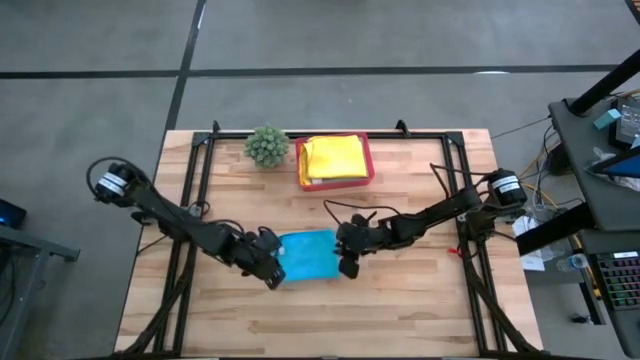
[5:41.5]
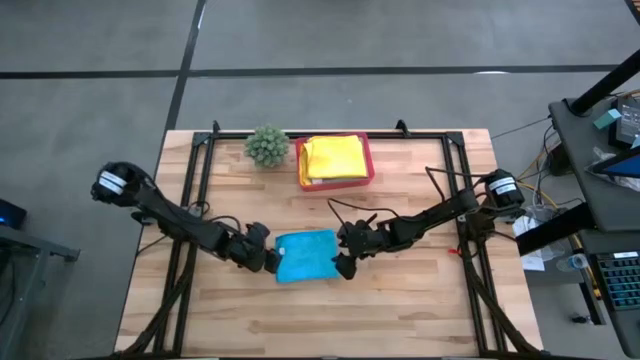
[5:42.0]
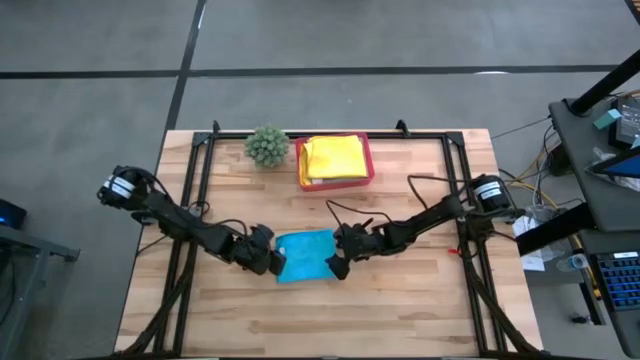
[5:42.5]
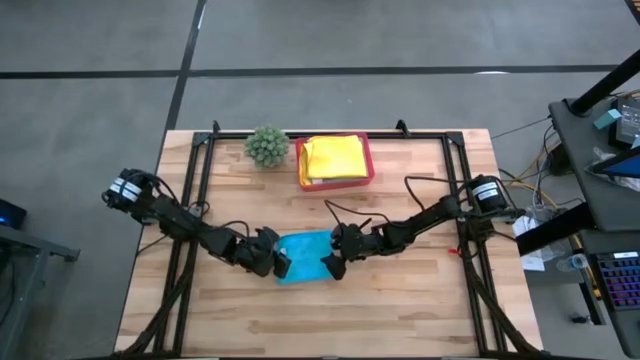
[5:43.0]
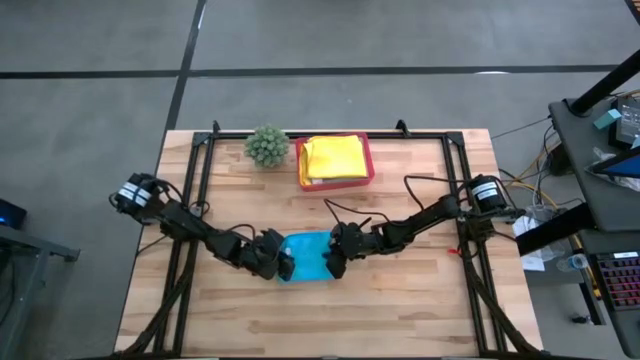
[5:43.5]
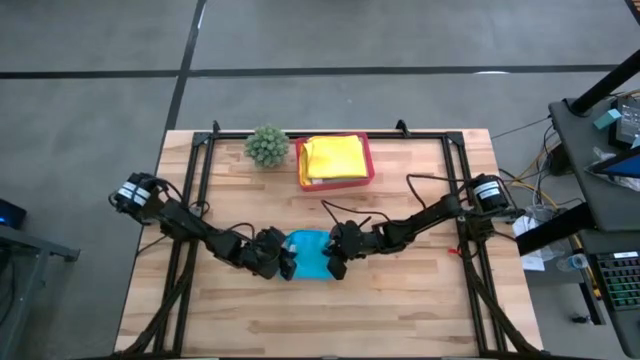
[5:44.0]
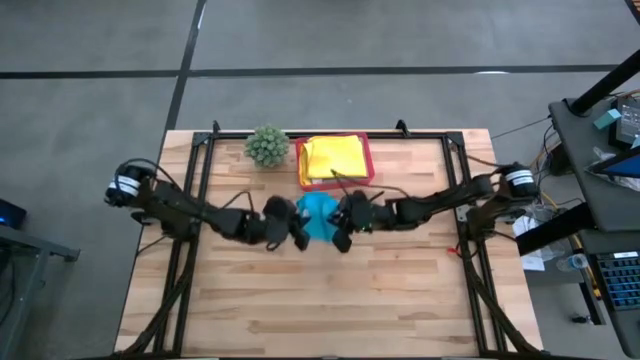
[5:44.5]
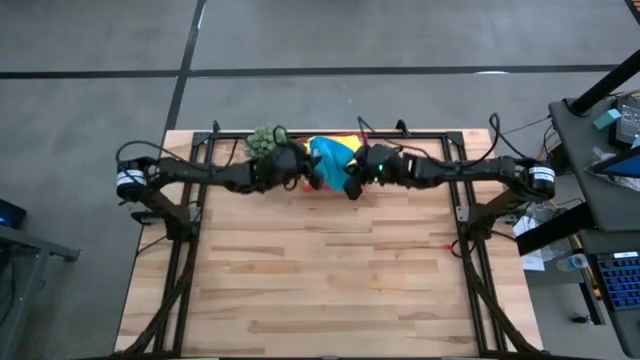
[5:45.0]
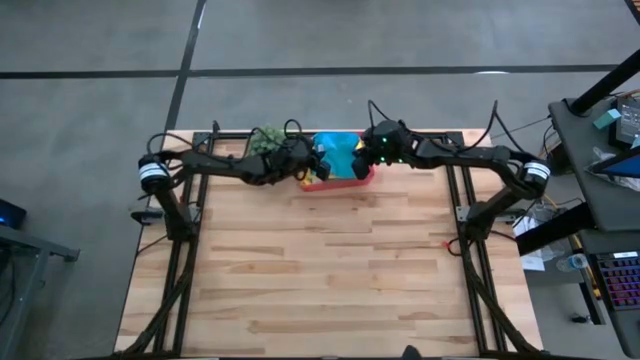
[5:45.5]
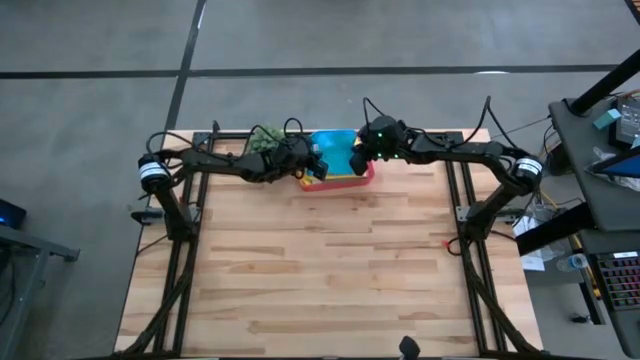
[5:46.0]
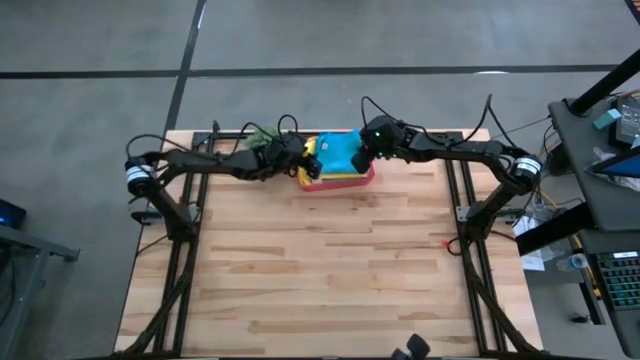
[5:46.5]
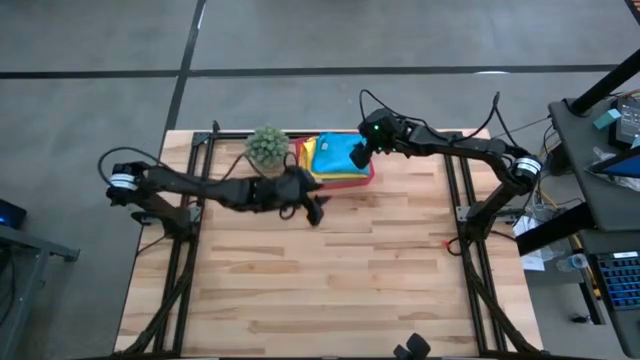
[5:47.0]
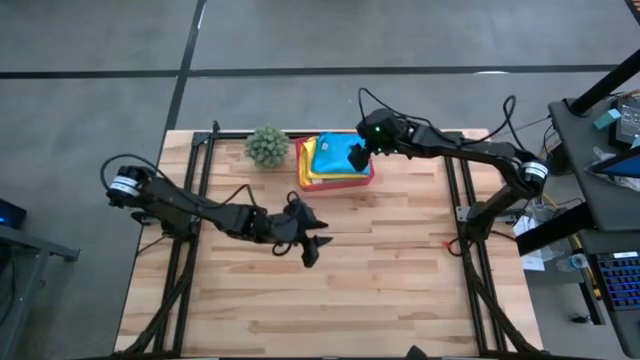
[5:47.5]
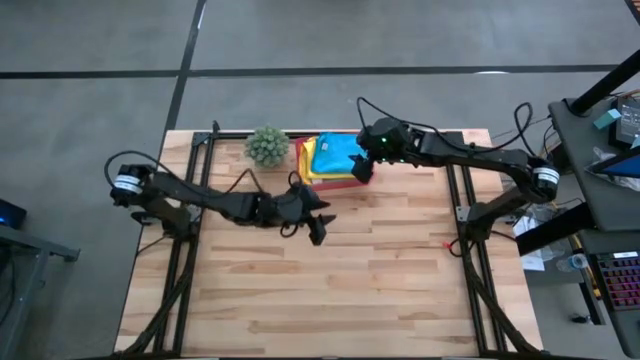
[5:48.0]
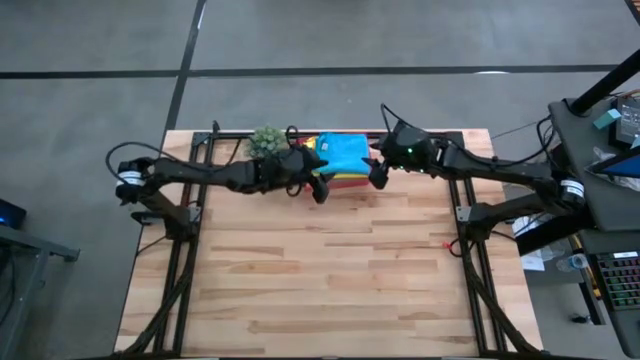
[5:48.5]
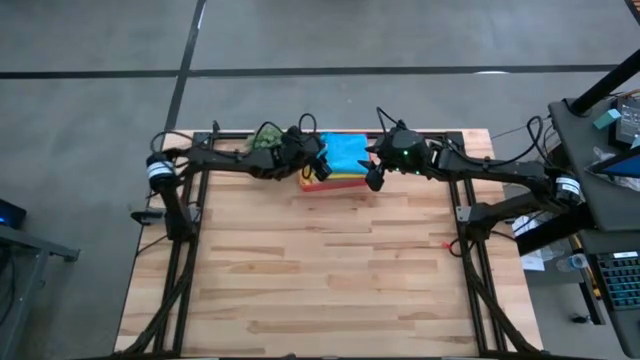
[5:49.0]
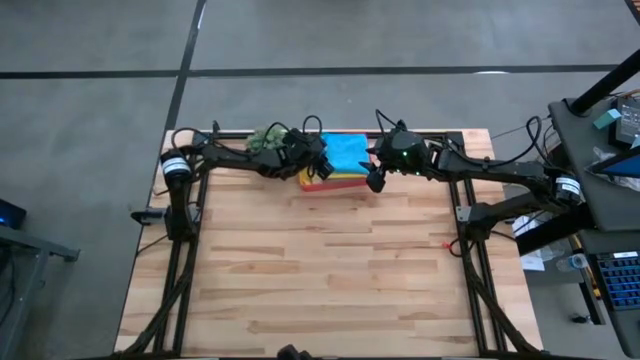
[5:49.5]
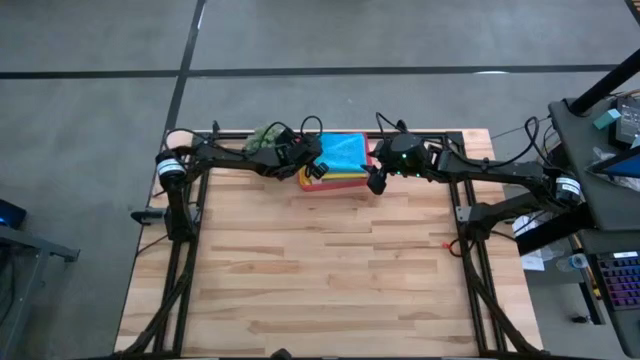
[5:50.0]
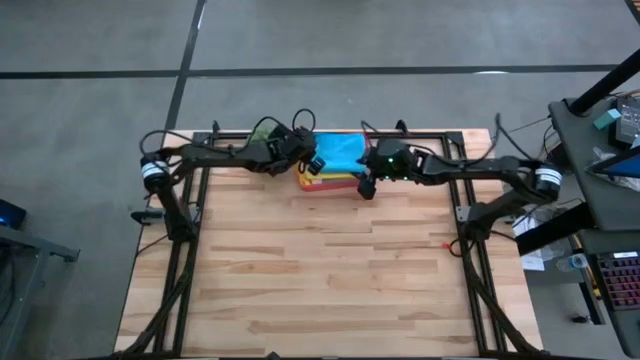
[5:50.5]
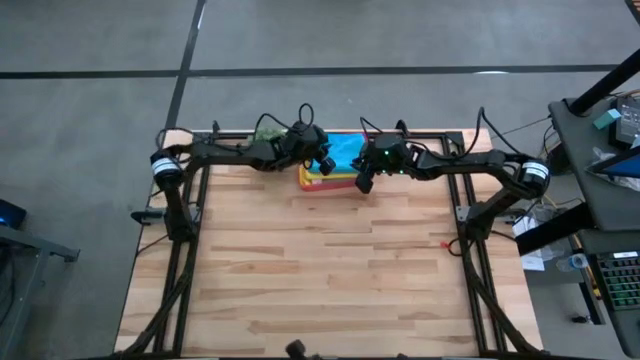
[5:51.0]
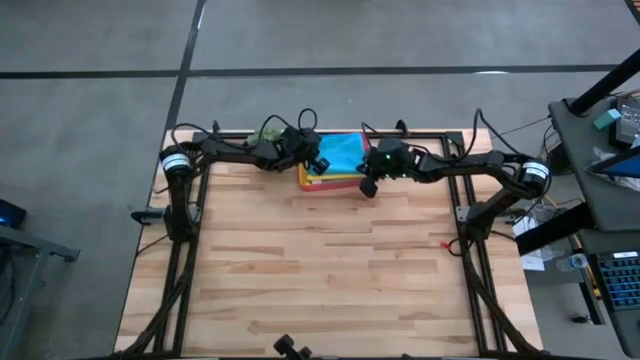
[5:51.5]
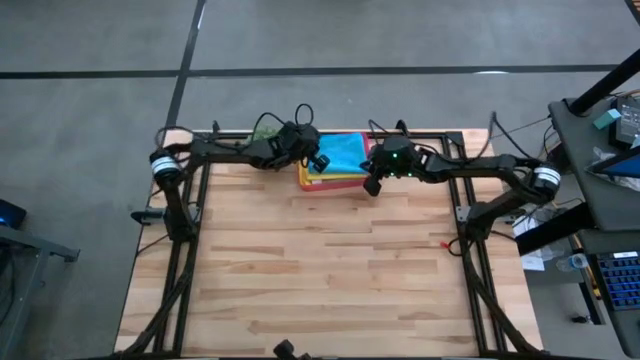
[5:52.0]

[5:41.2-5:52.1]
Task: Fold microfiber towels
Put the folded blue microfiber towel into the red bin

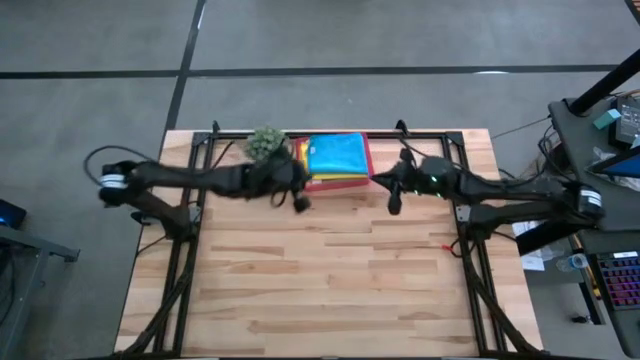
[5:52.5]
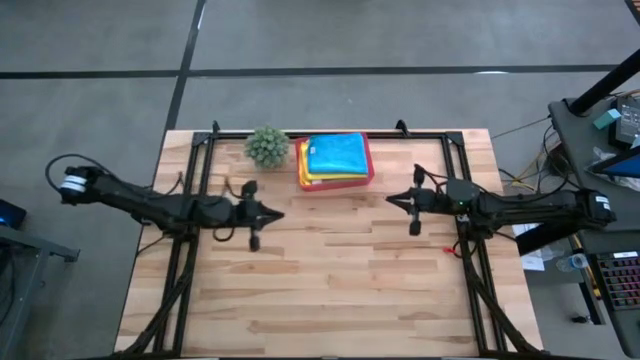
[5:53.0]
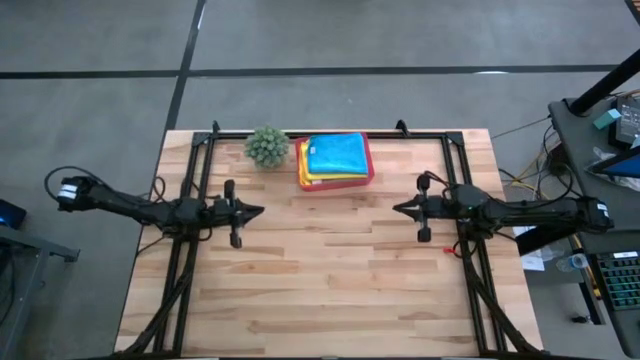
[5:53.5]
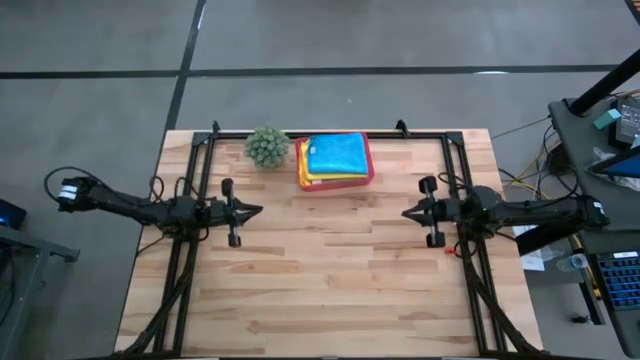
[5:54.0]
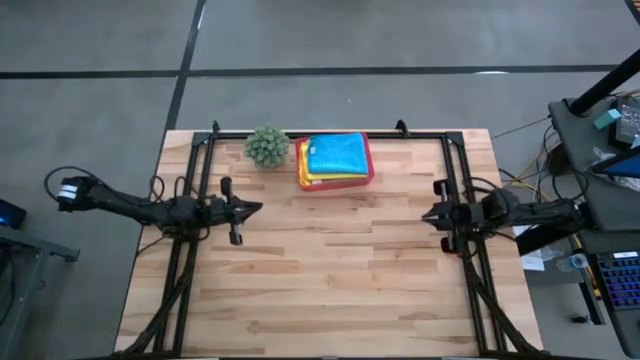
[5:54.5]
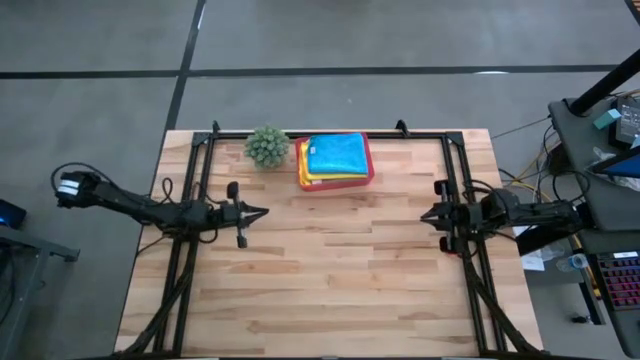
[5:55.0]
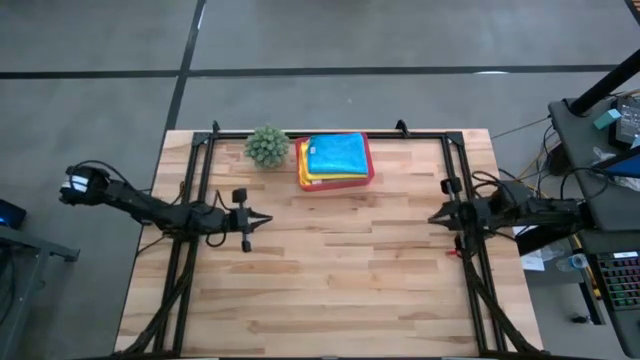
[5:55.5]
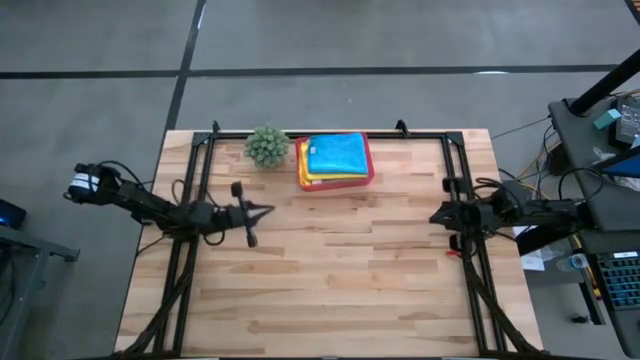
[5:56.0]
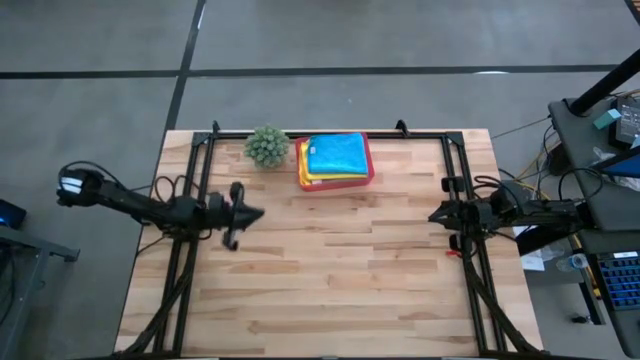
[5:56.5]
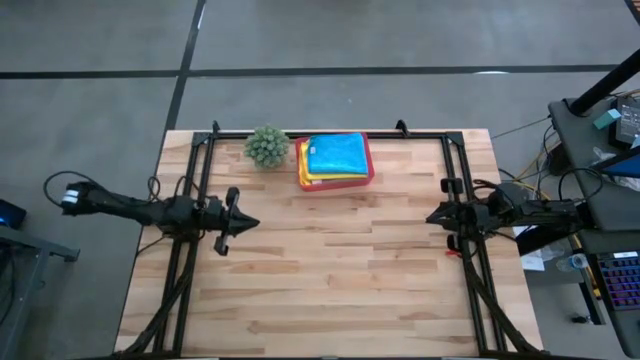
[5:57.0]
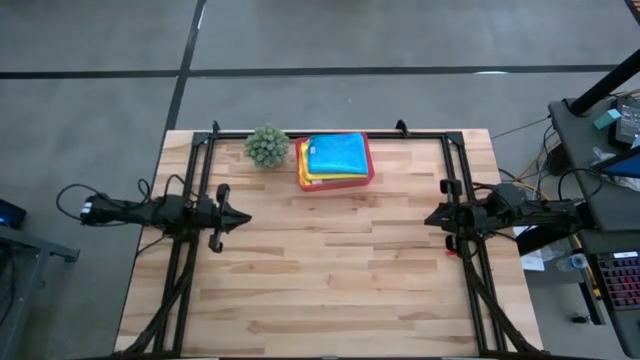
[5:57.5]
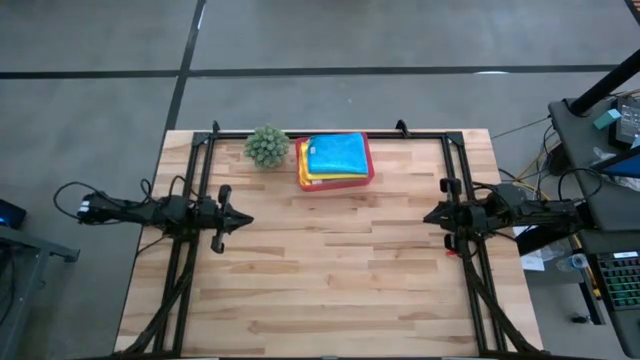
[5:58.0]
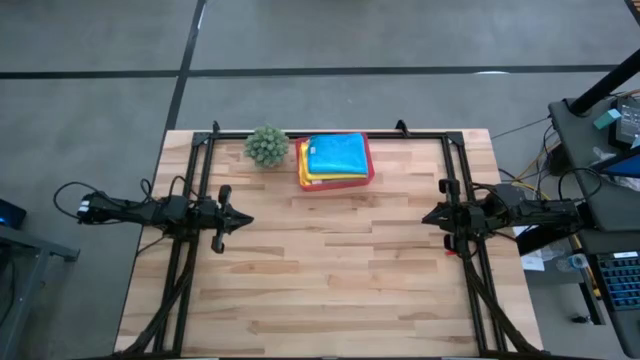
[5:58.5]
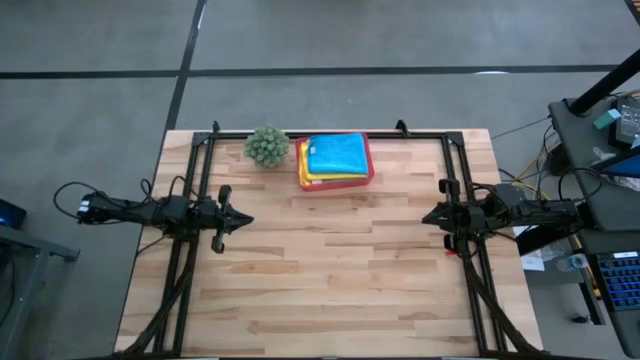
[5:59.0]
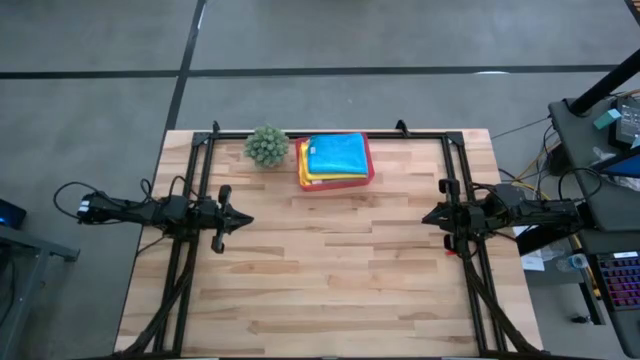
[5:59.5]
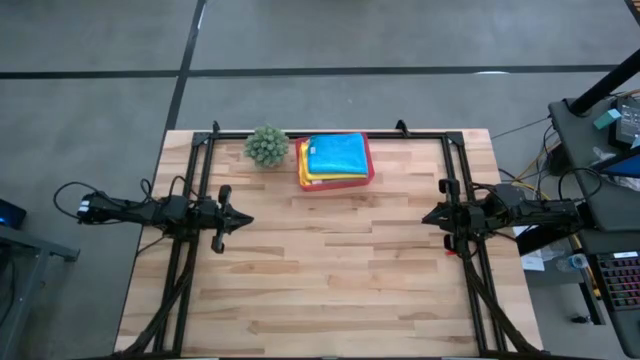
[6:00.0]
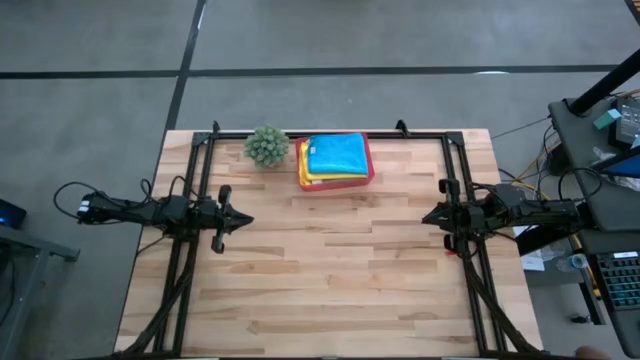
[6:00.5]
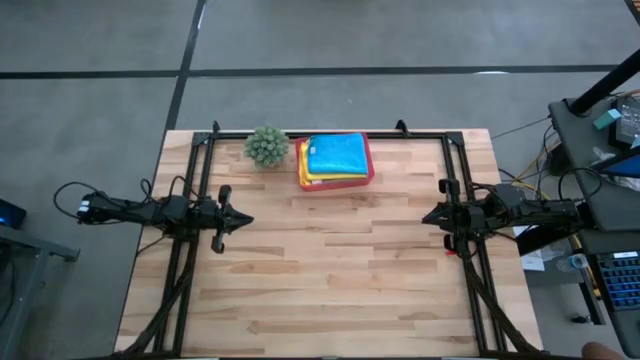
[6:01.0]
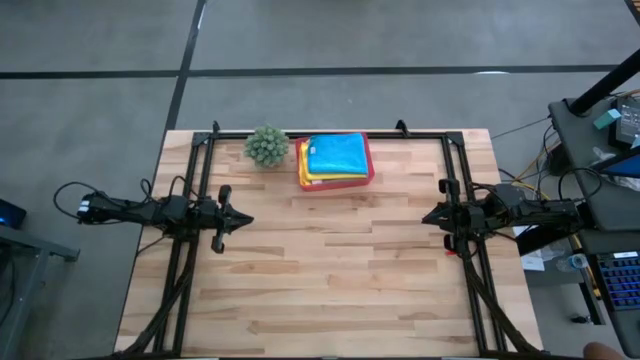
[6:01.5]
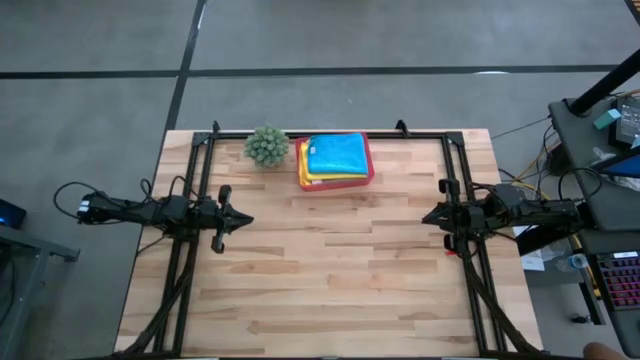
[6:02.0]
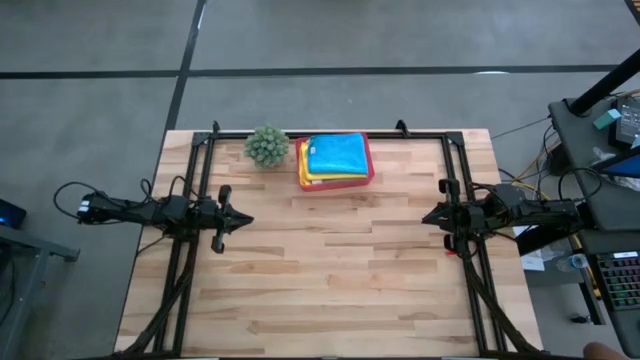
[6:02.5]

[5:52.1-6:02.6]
Return to Home Position
